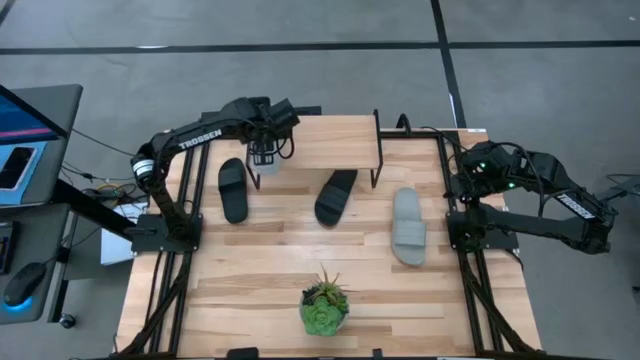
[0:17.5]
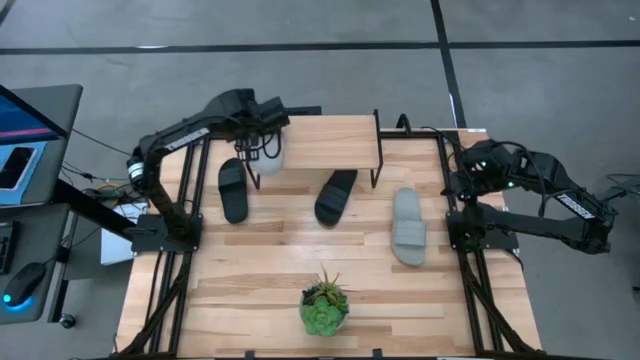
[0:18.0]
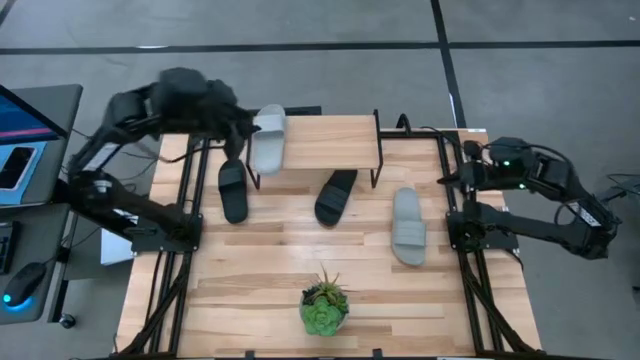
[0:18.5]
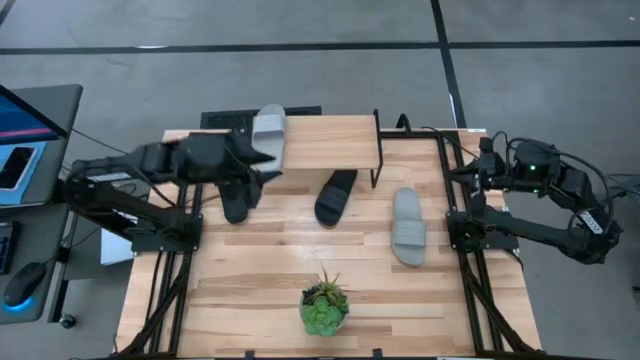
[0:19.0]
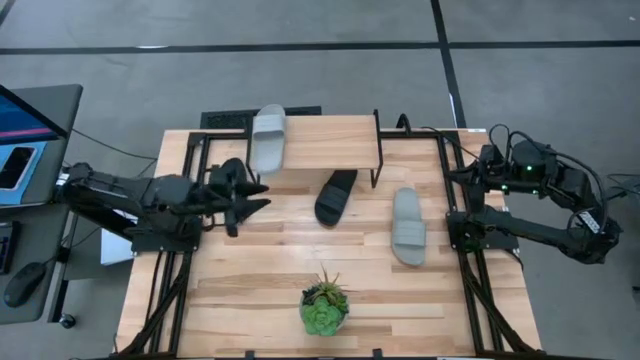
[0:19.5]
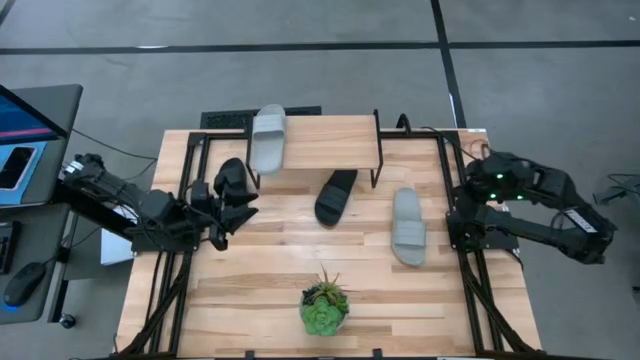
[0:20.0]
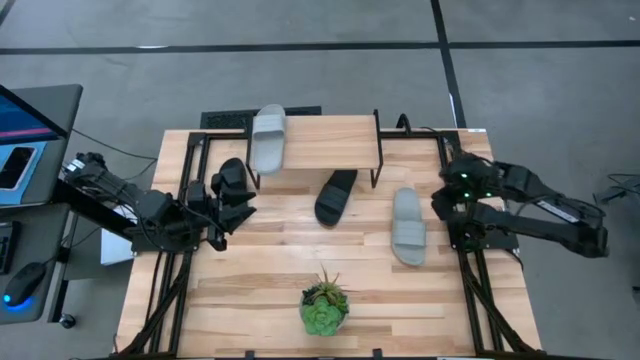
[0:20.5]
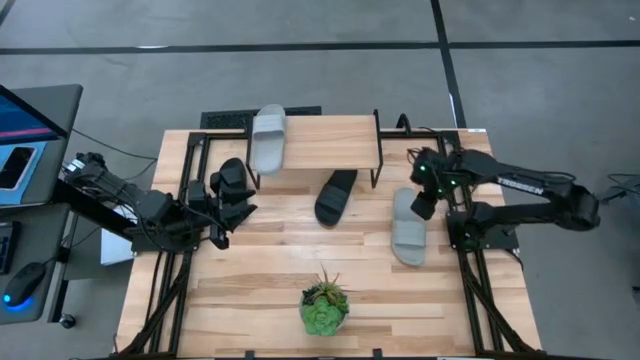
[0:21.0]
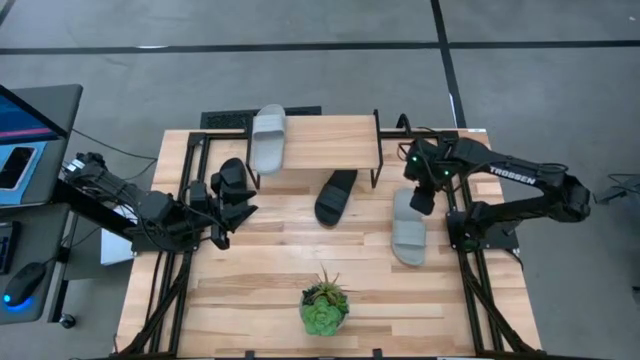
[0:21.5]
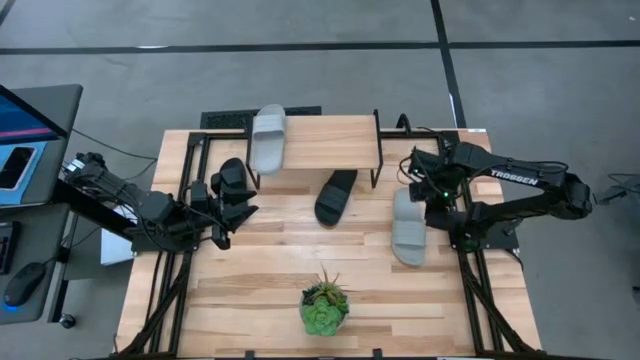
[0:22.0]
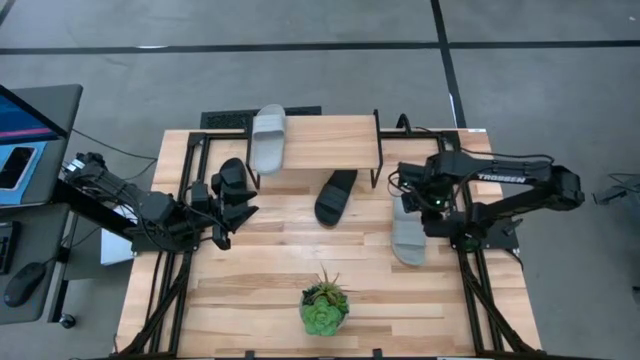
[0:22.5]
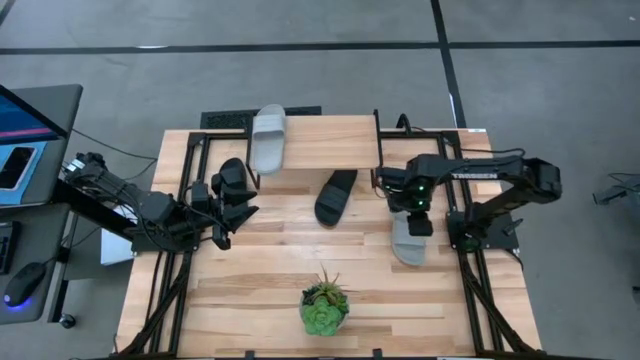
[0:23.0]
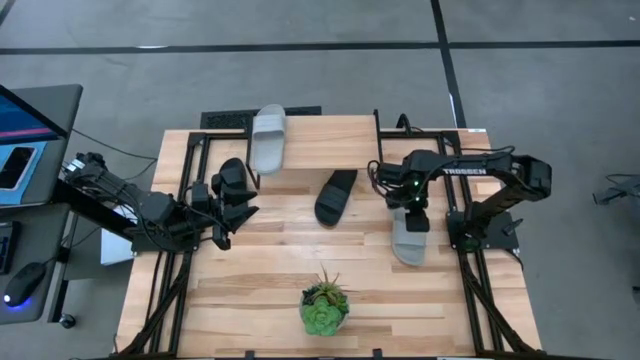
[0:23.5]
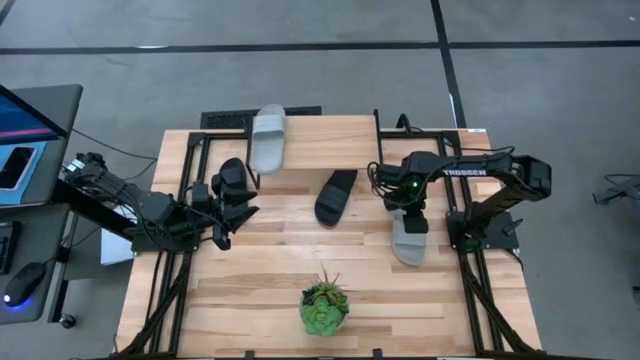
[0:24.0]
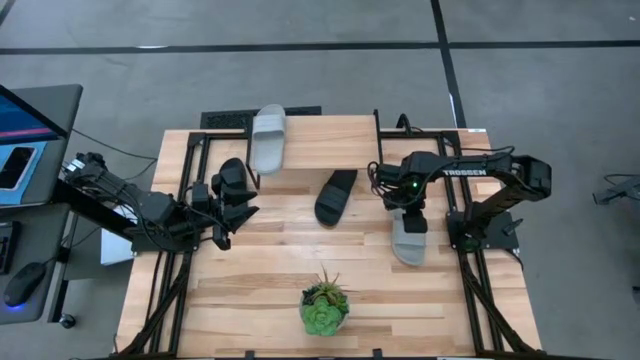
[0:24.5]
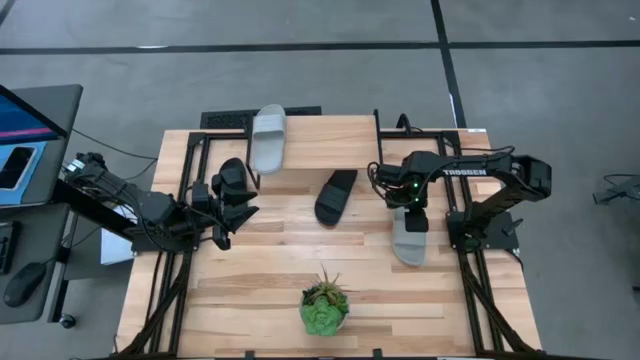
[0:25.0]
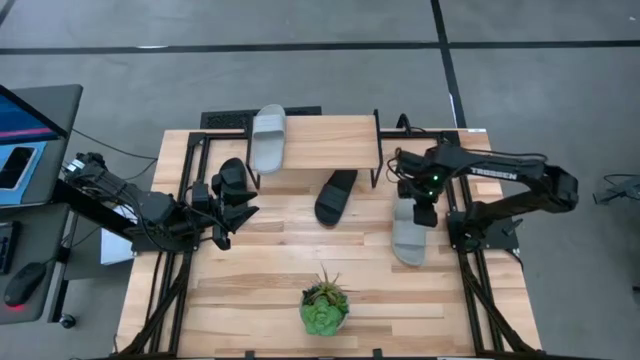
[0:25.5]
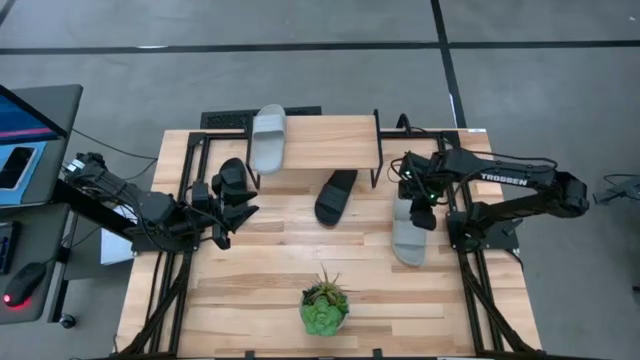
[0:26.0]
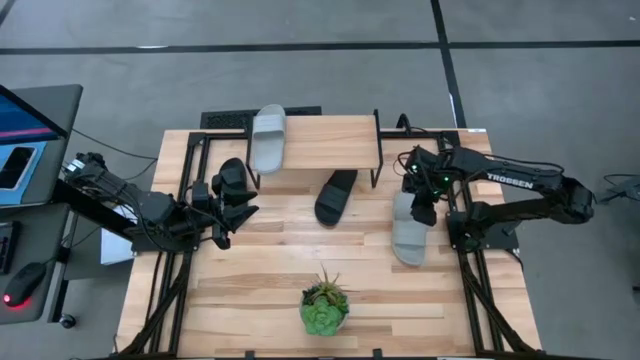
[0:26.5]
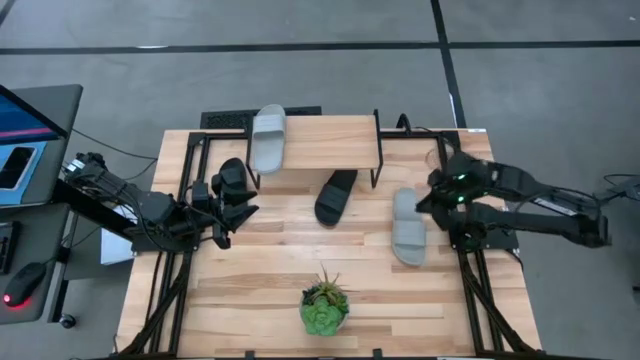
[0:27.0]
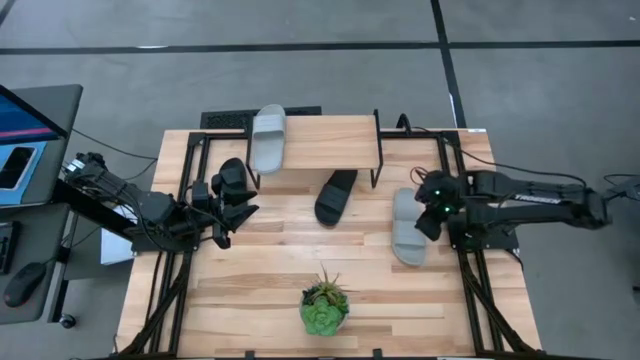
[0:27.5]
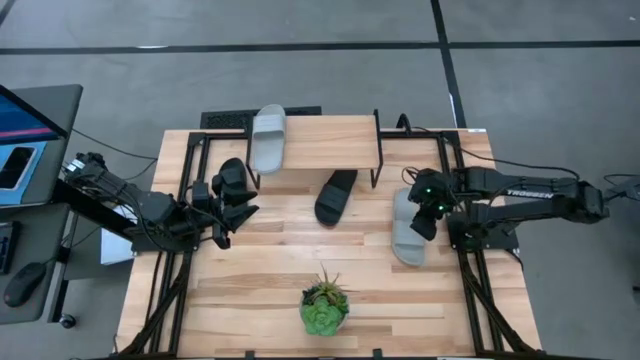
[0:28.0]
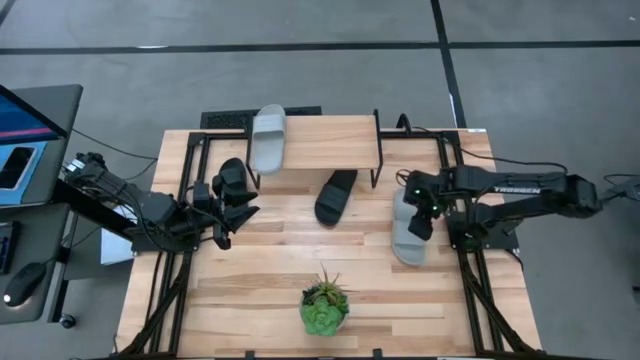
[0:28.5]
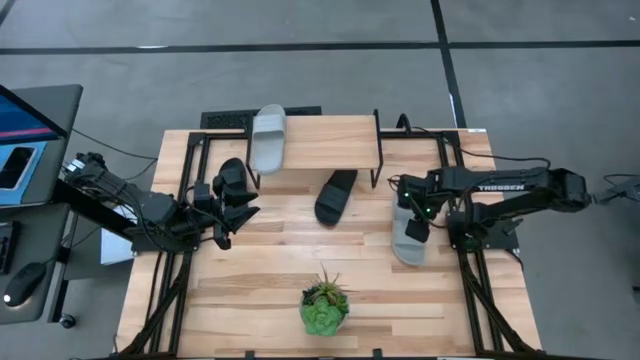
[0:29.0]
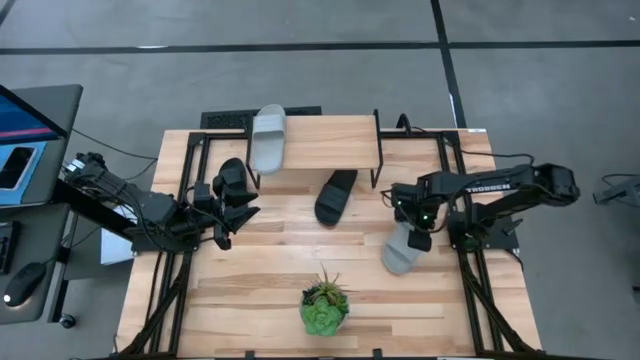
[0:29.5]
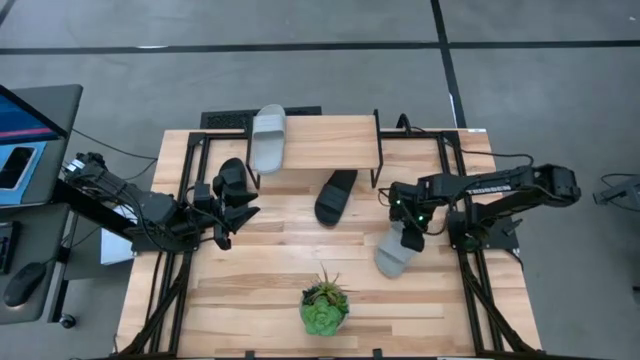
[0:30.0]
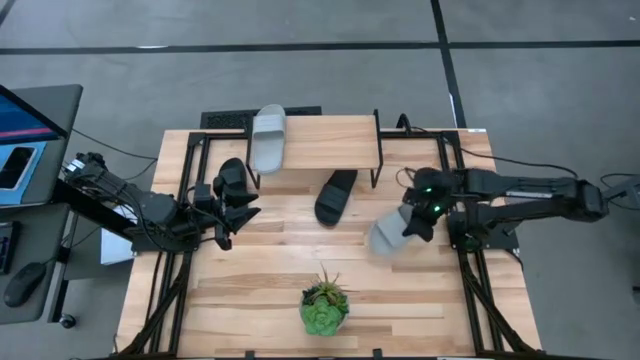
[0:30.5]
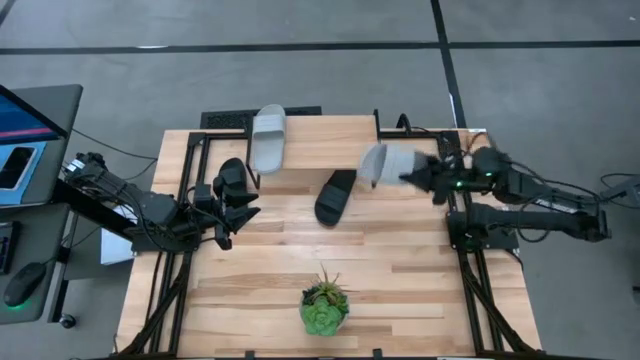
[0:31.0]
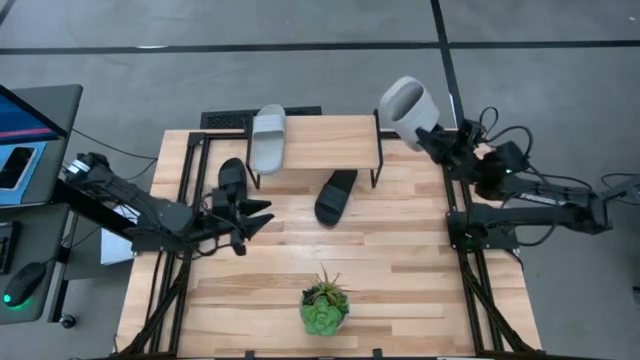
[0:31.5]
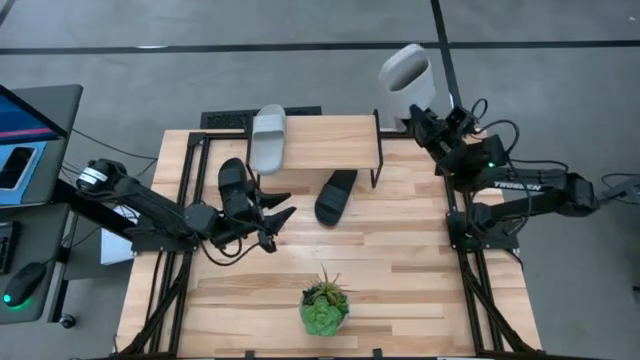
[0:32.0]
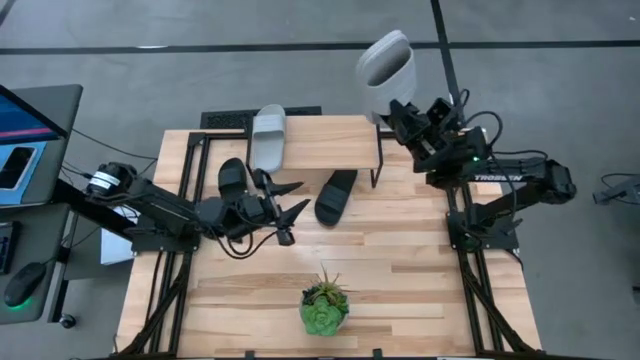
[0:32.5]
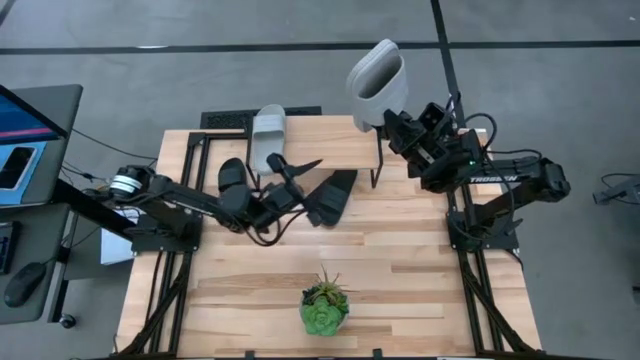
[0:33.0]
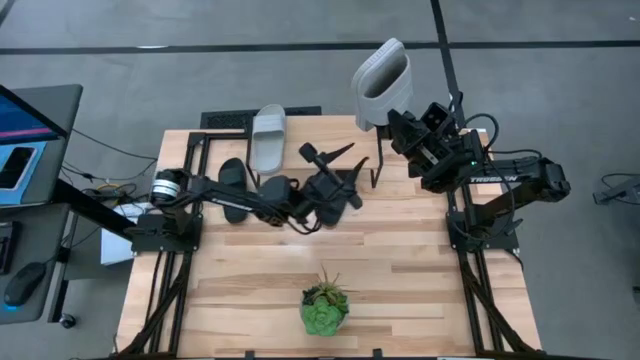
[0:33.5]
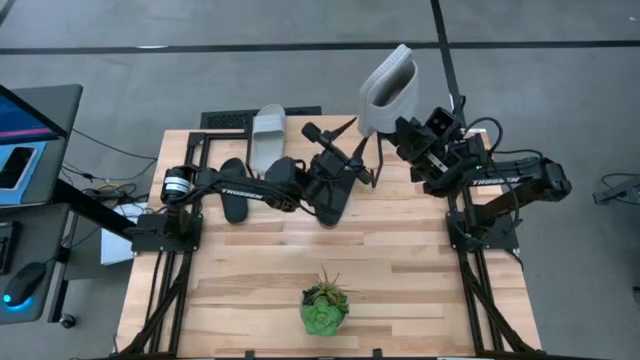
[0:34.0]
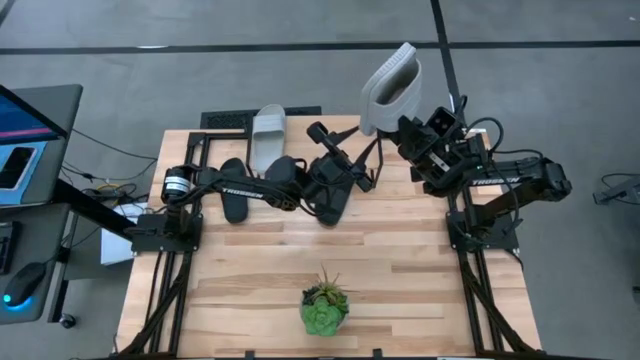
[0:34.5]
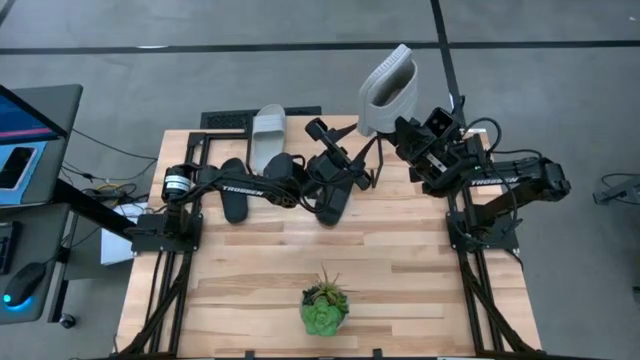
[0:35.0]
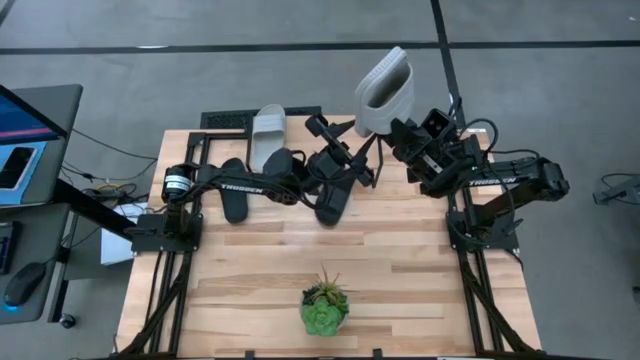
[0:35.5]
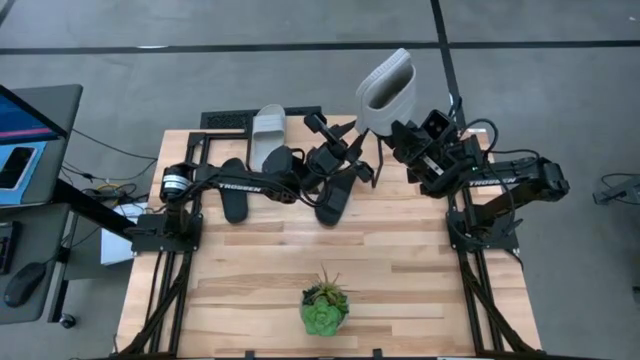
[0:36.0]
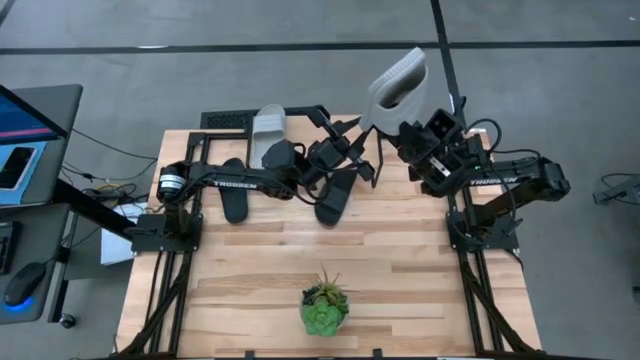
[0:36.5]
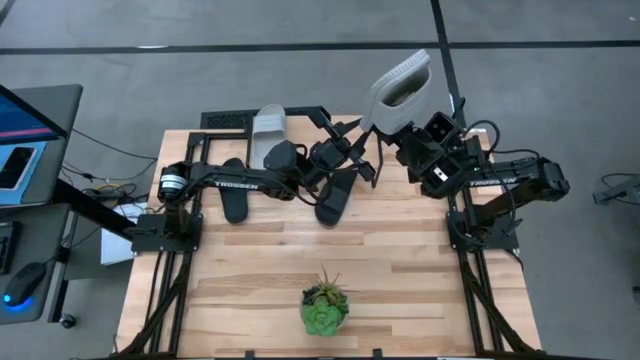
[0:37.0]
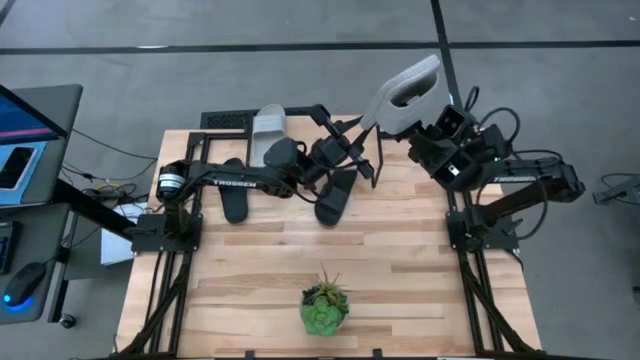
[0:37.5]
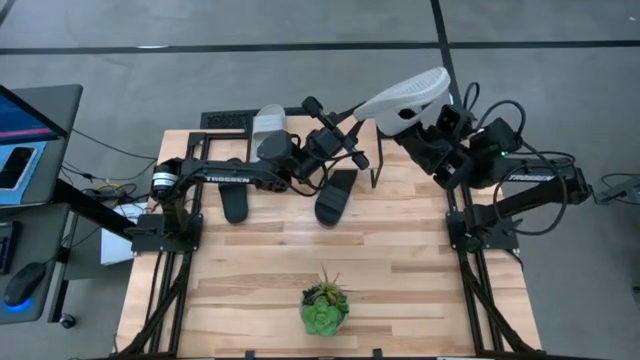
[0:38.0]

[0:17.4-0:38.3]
Task: Pick and place slides into the shelf
Put the gray slide on the shelf
